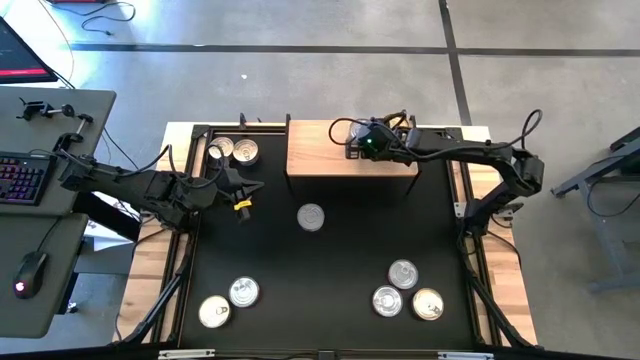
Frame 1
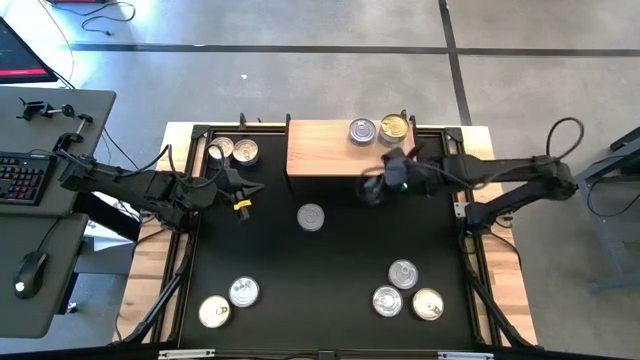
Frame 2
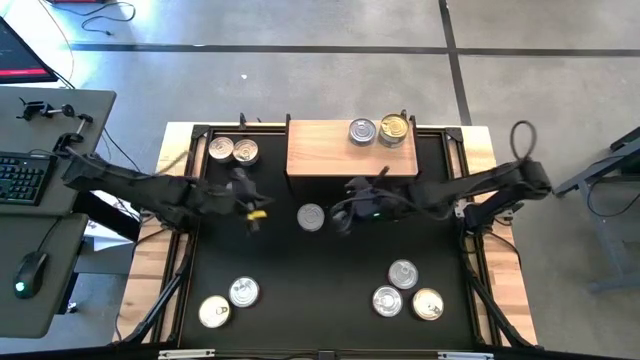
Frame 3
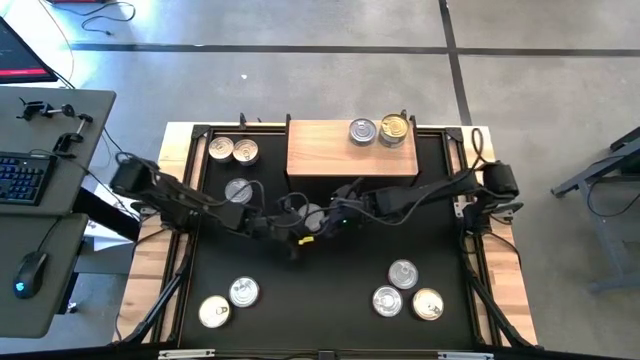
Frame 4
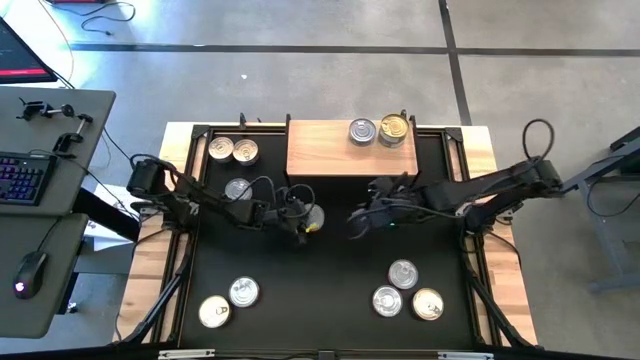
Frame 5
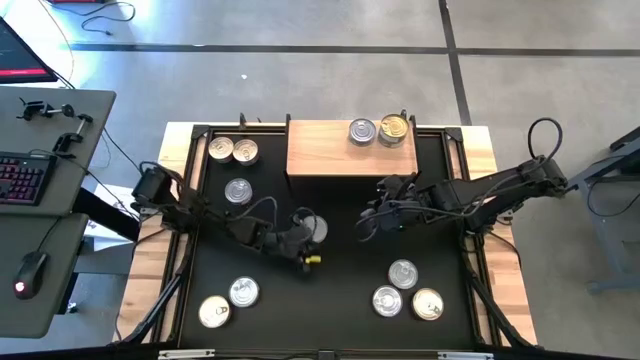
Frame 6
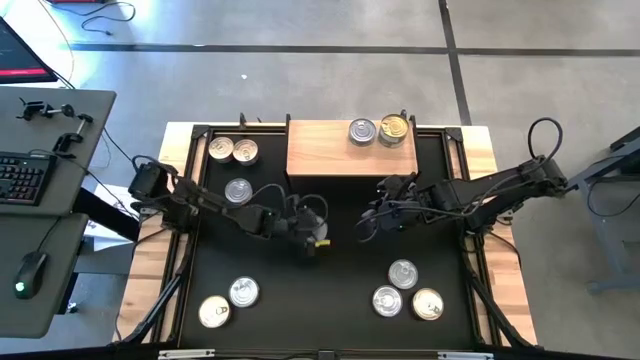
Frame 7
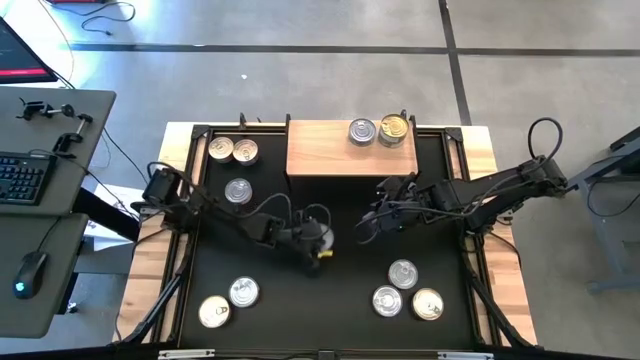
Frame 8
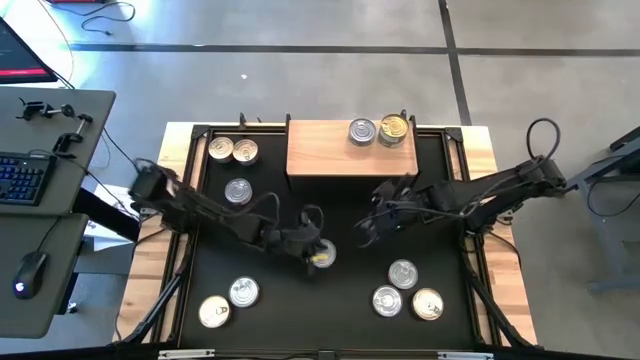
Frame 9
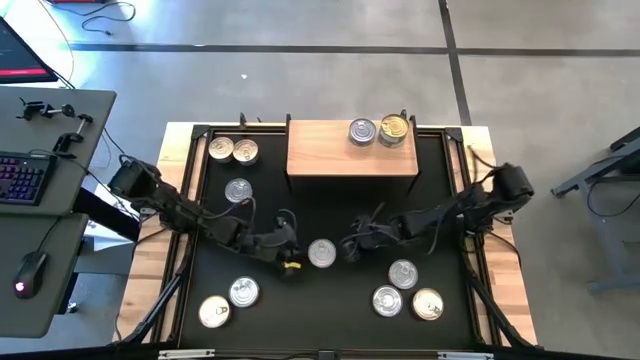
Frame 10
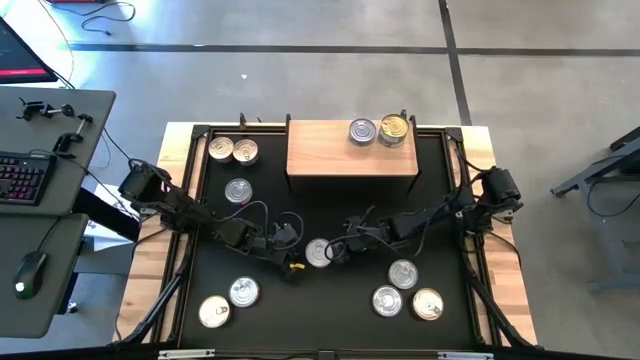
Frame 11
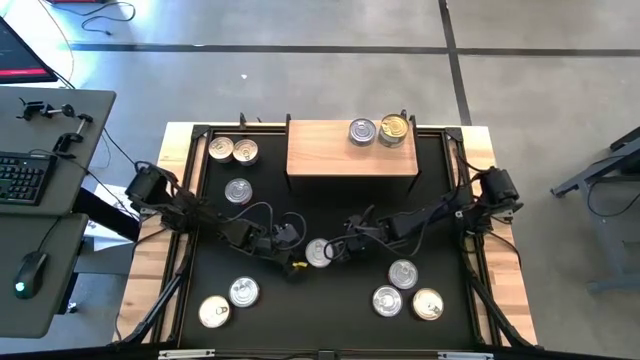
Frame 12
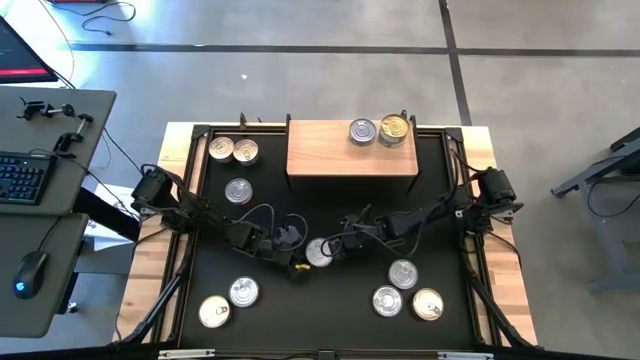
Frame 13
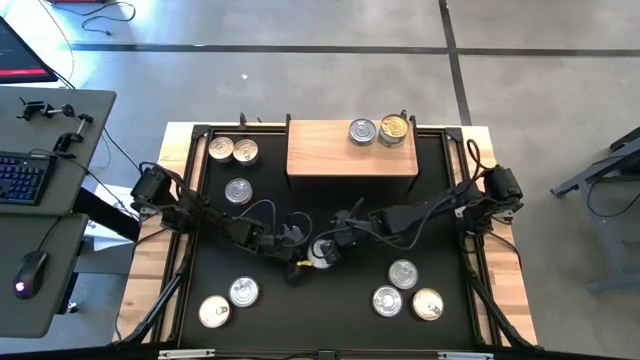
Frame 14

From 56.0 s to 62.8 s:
Task: Stack canned seafood by type on shelf
Stack the green tuna can on top of the green tuna can on the shelf

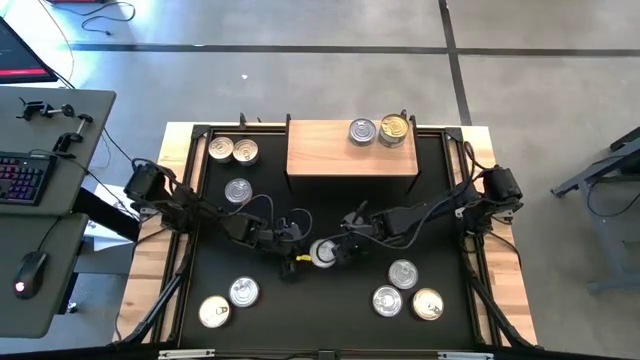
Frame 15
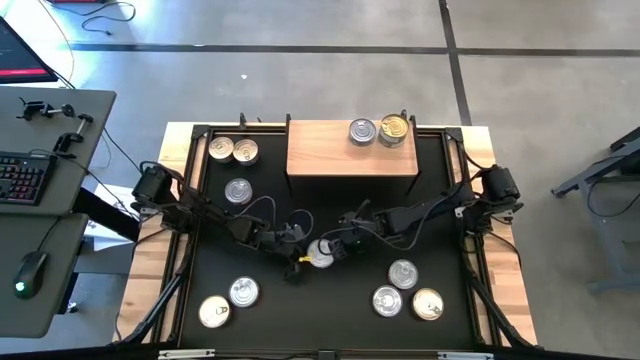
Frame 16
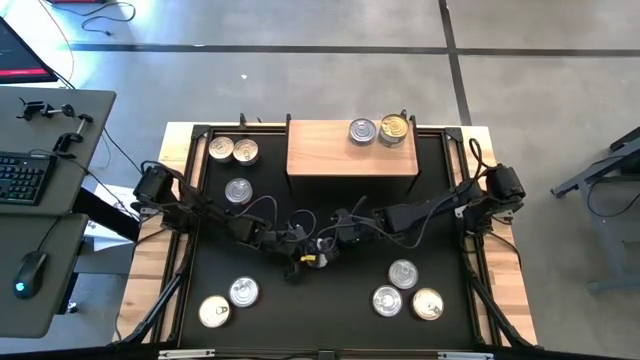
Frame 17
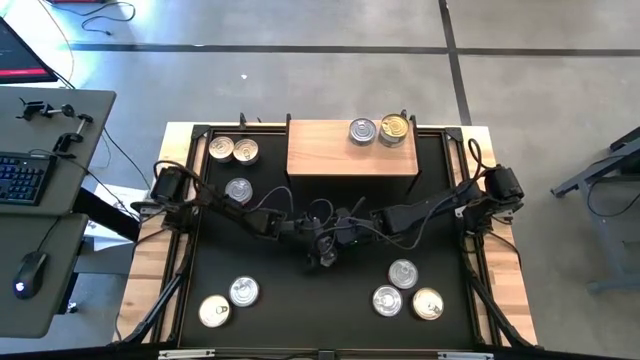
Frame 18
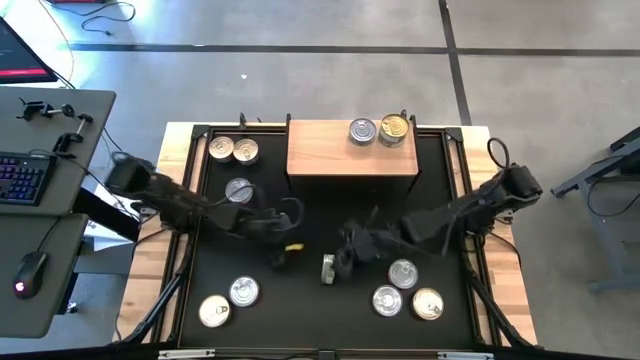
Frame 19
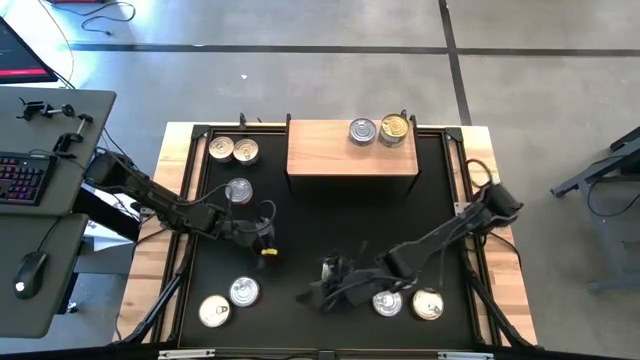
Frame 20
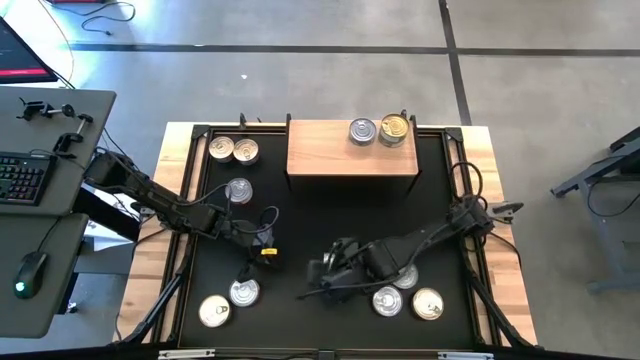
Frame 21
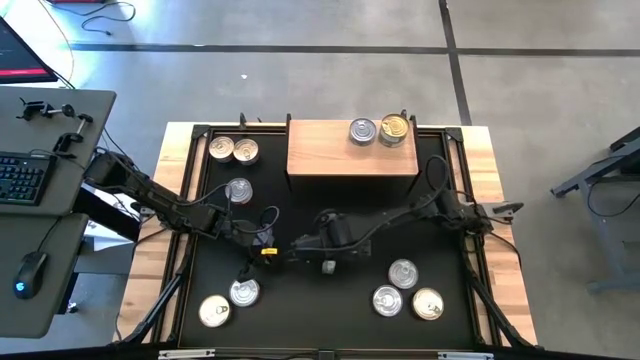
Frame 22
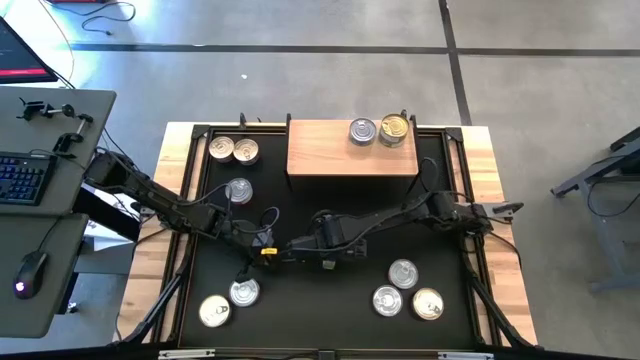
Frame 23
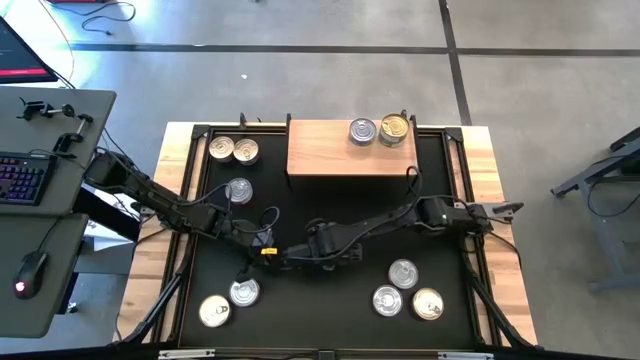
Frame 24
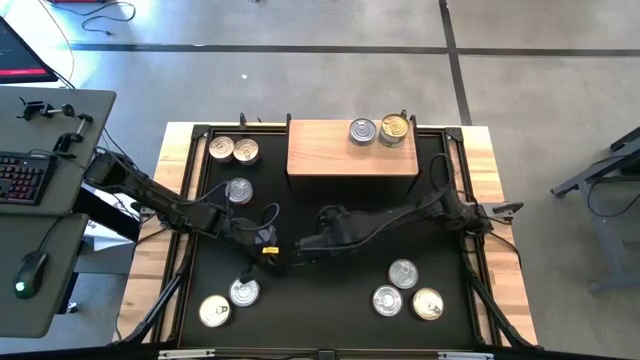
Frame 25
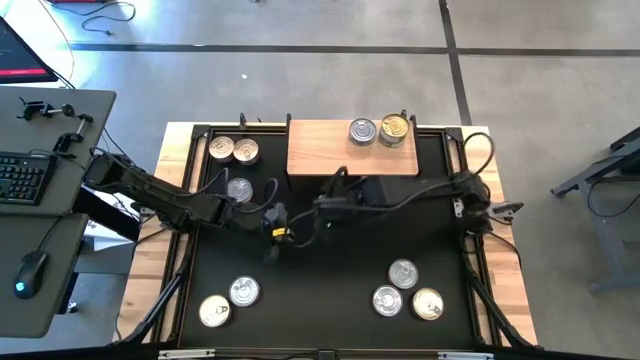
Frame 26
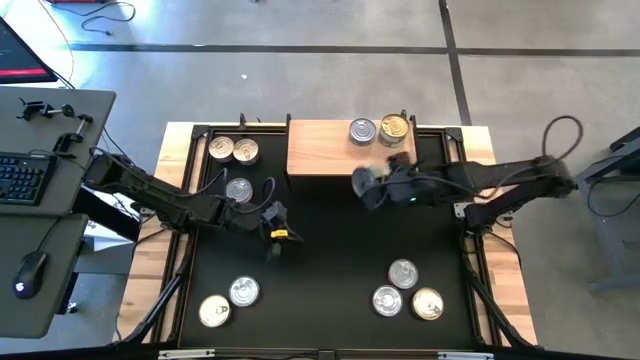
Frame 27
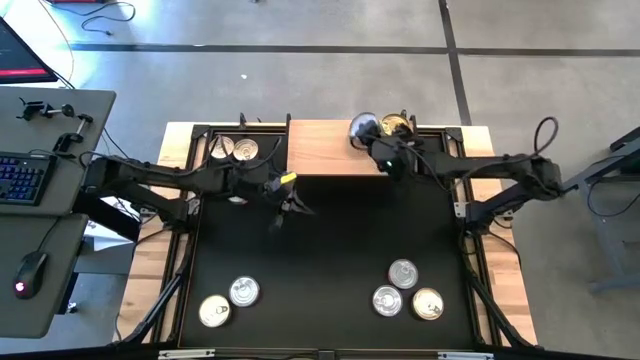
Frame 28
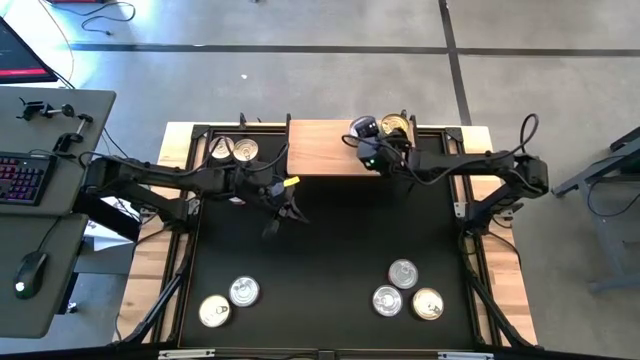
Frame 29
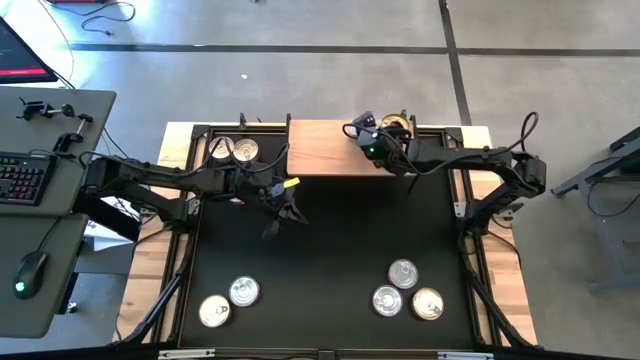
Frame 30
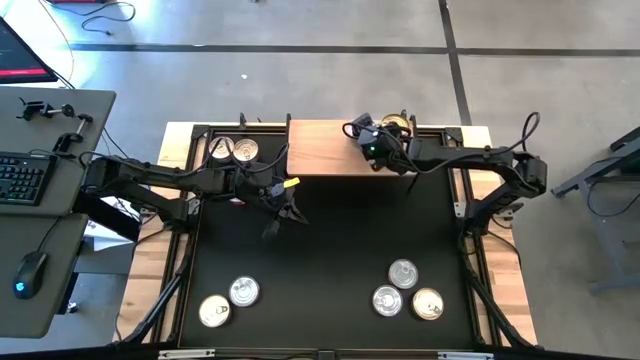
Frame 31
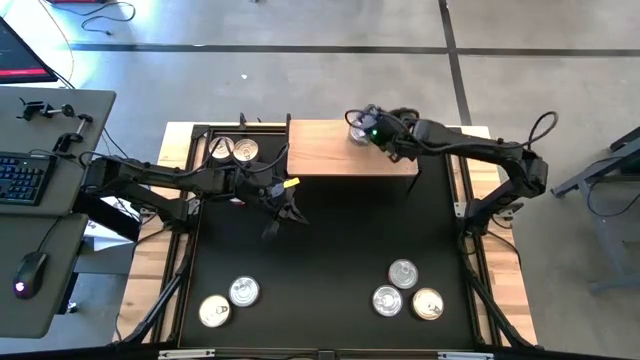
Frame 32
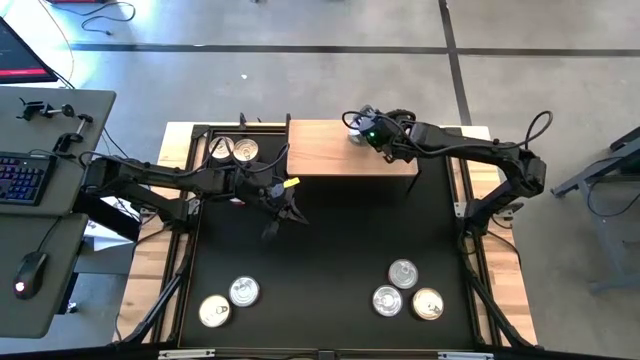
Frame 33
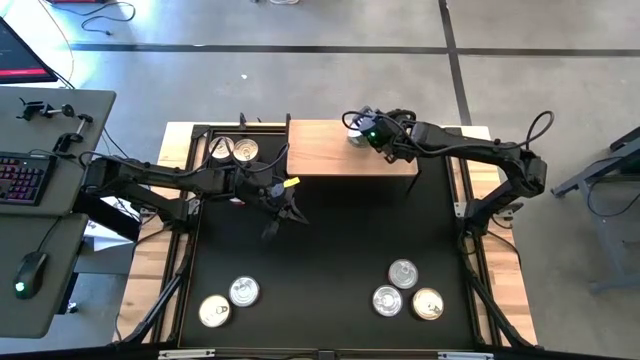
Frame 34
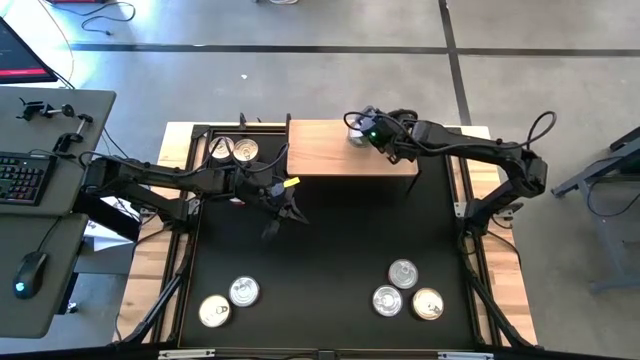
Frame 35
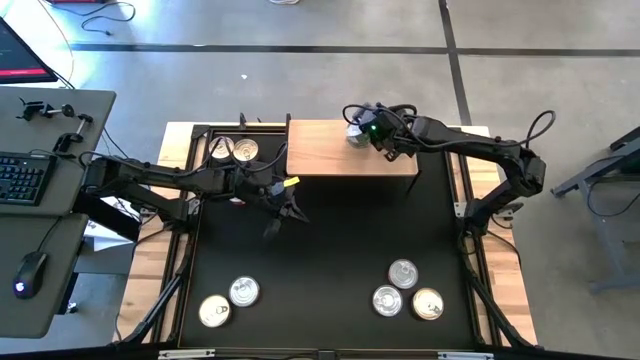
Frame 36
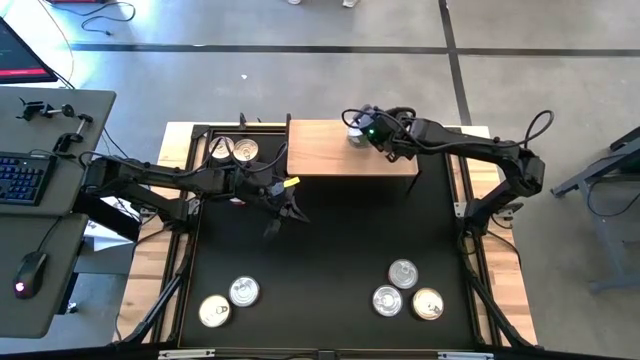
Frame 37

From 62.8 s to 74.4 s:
Stack the green tuna can on top of the green tuna can on the shelf
